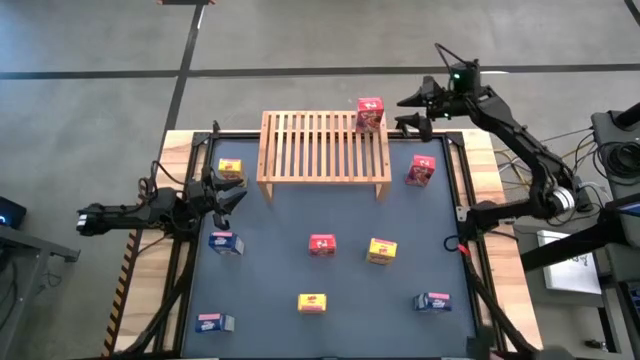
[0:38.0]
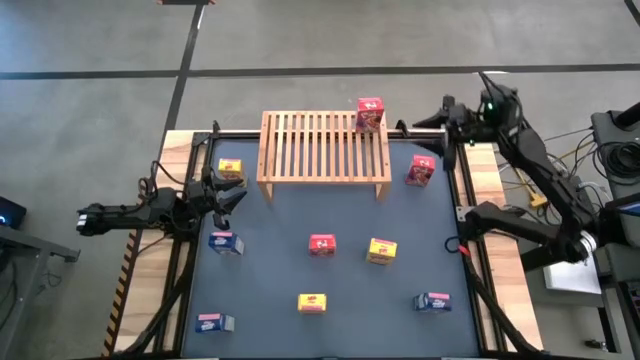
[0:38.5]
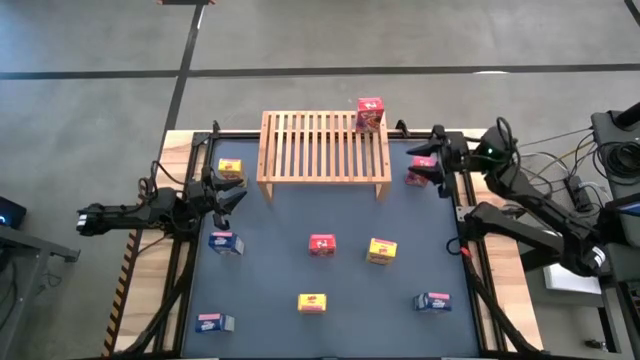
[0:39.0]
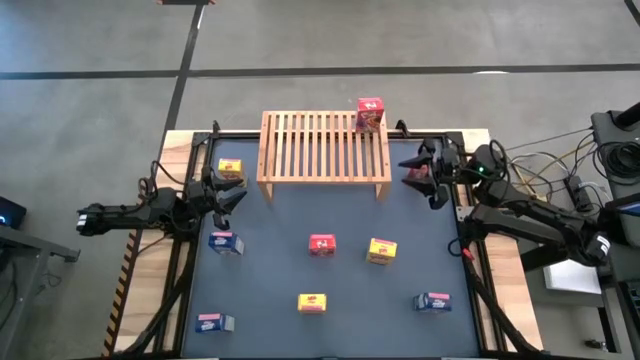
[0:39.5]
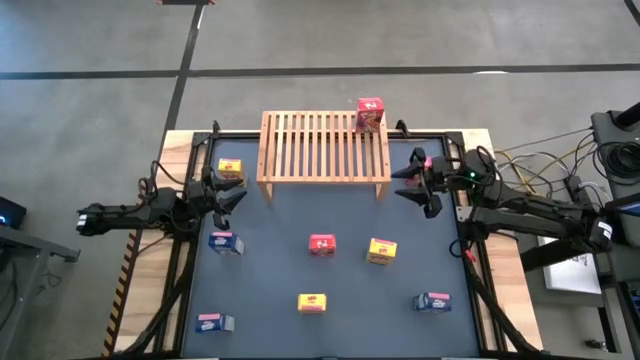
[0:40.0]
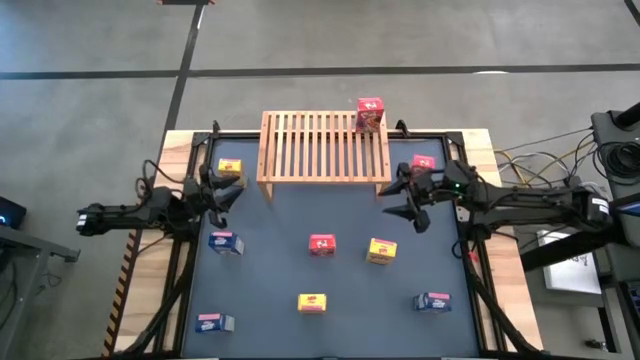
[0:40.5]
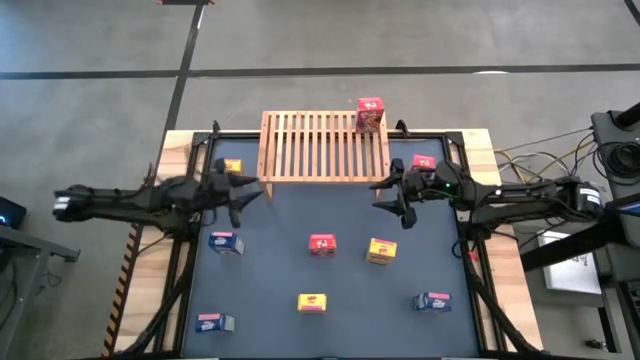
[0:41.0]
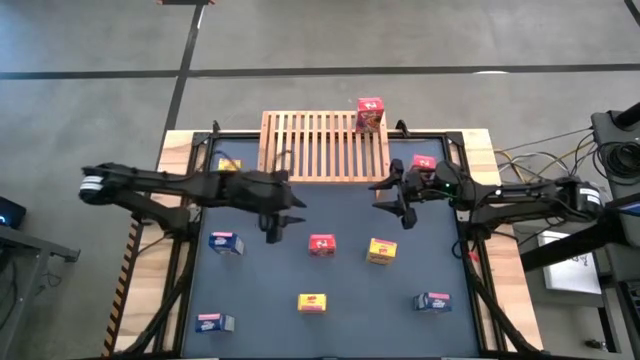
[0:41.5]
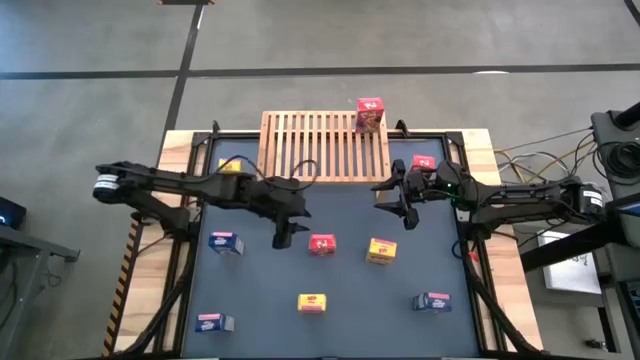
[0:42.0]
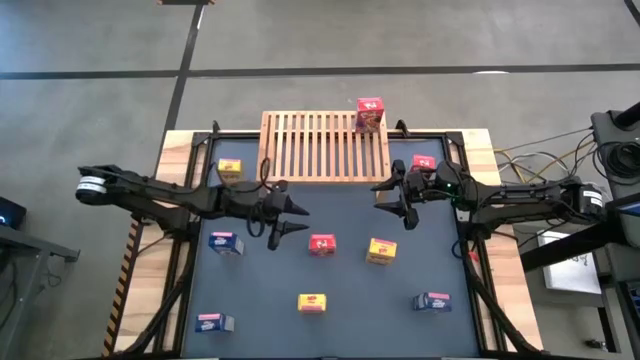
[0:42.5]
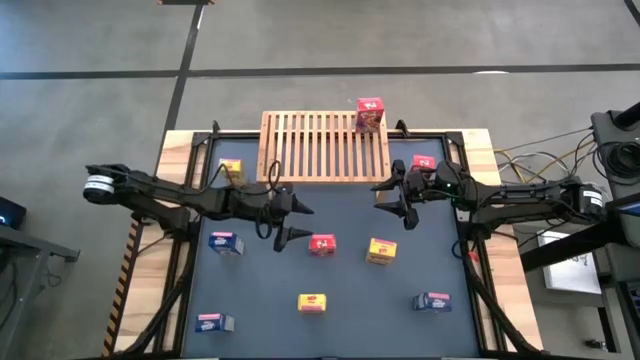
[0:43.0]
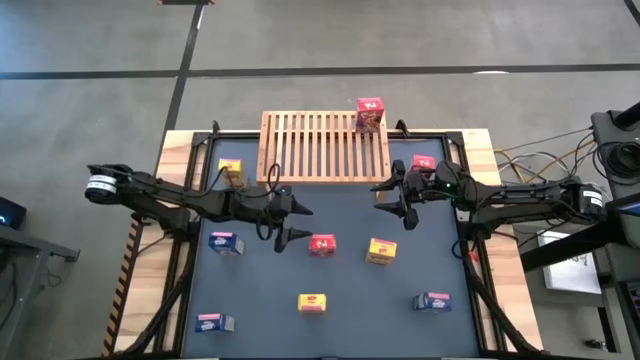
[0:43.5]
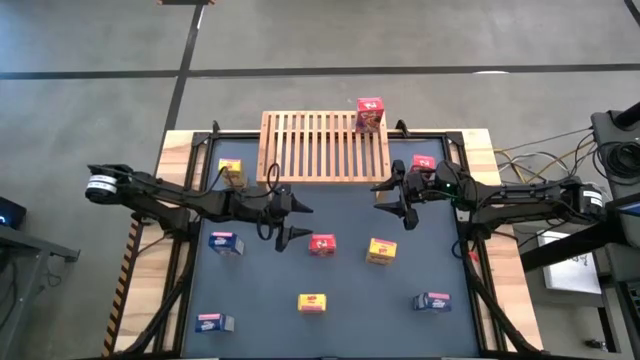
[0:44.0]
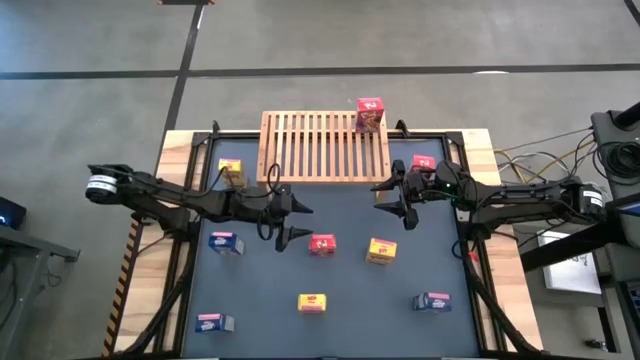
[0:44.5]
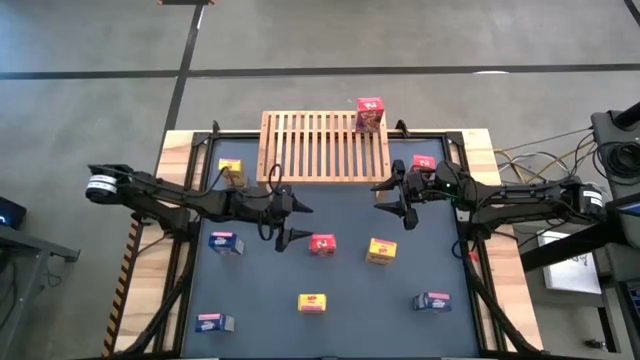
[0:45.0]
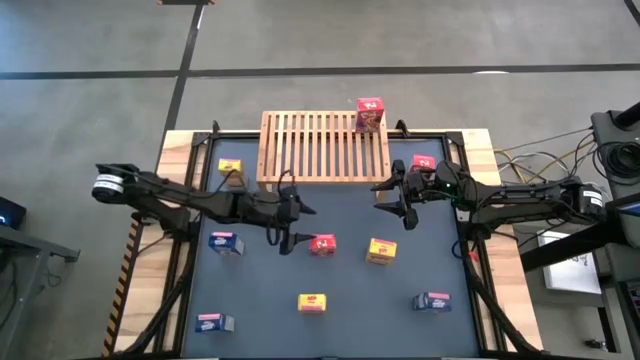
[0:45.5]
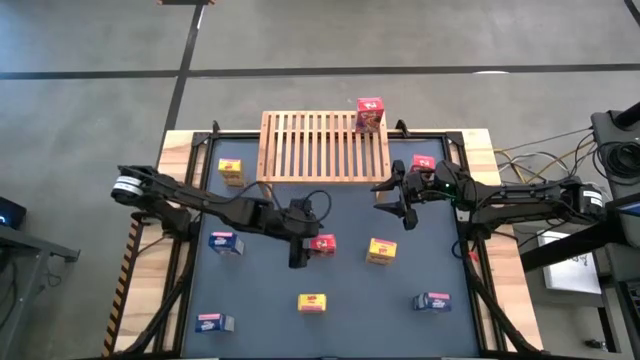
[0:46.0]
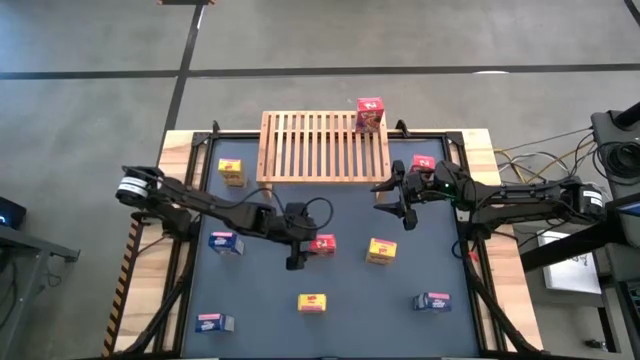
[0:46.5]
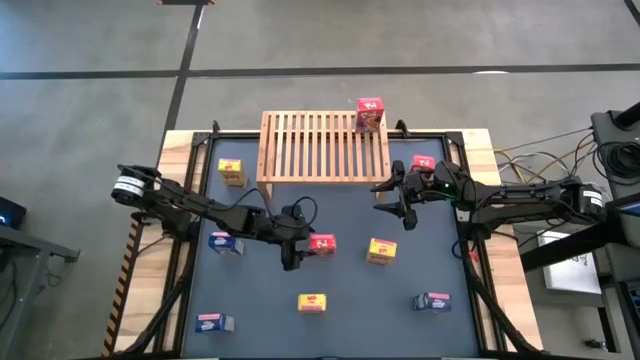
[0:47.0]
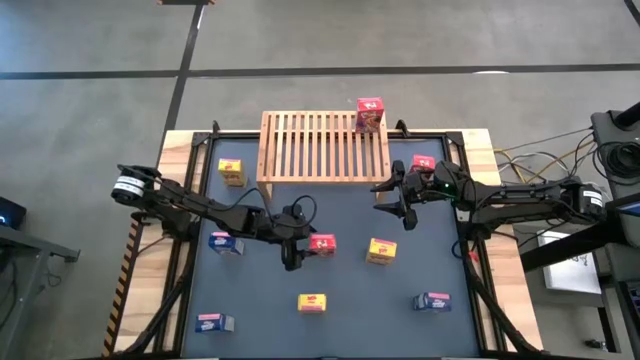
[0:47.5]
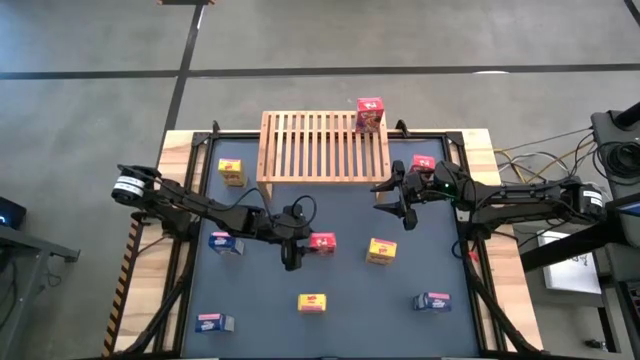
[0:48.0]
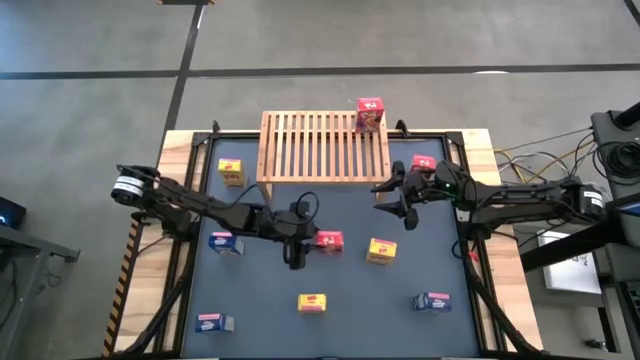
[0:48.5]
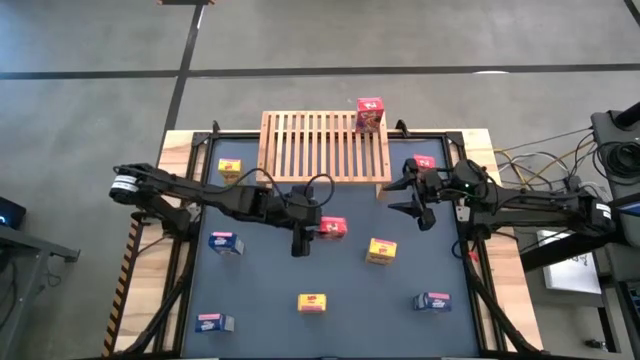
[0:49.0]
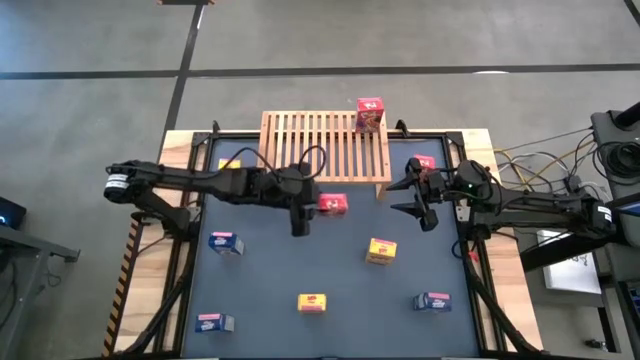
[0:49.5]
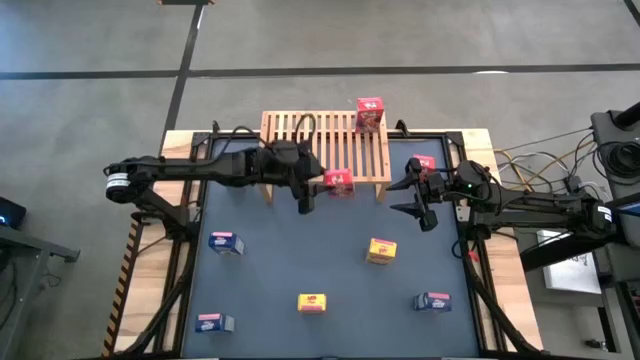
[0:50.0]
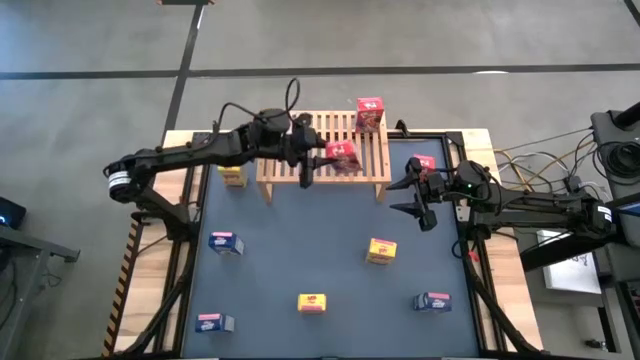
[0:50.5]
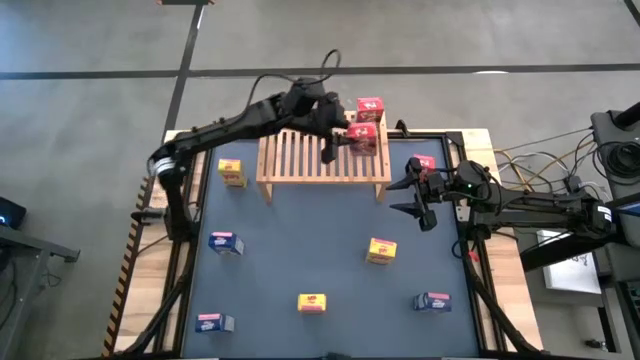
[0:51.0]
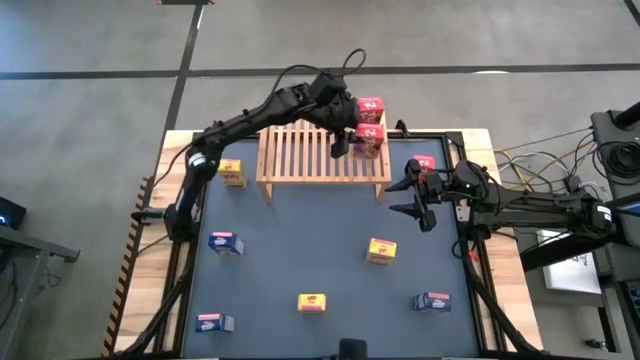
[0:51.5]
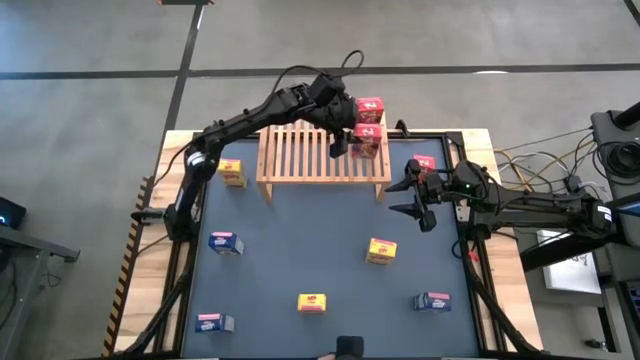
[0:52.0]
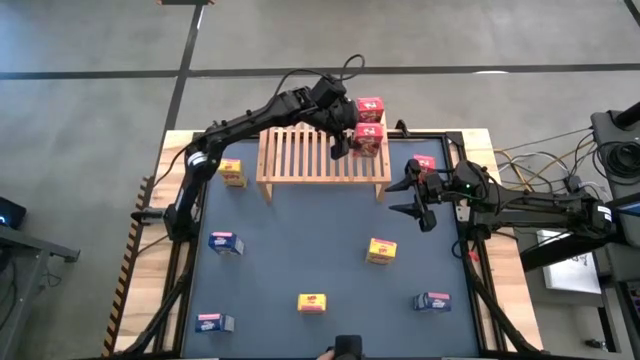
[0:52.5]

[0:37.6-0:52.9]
Task: Stack cereal on shelf
Put the bottom red cereal box on the shelf aligned with the red cereal box

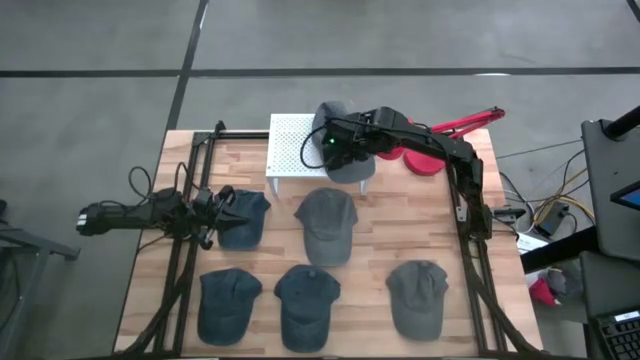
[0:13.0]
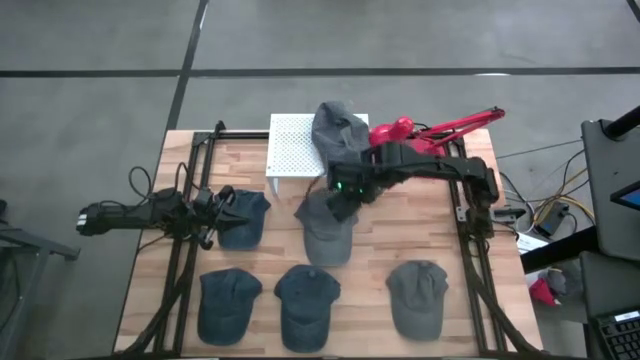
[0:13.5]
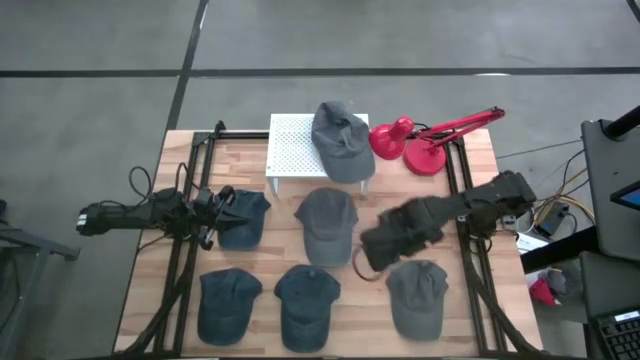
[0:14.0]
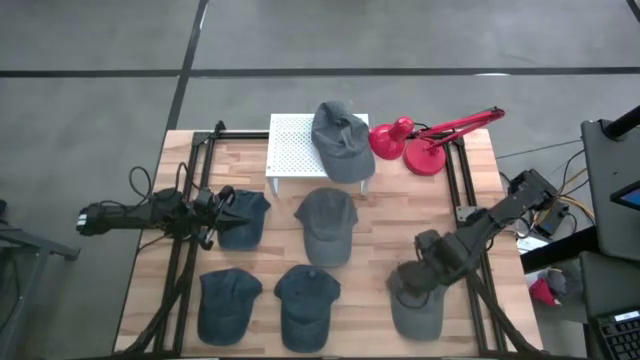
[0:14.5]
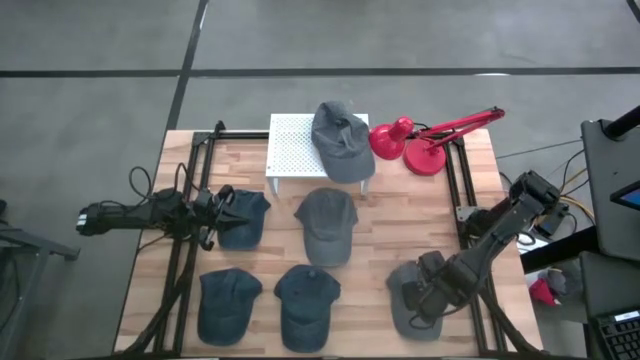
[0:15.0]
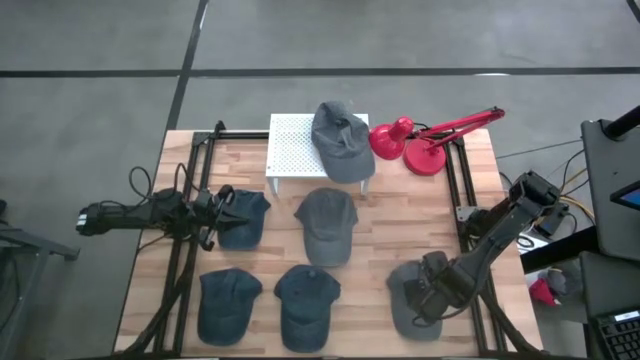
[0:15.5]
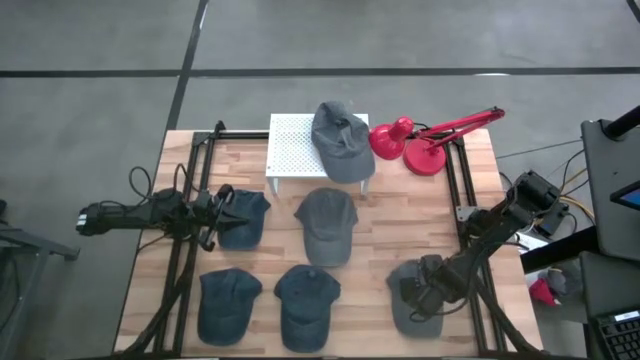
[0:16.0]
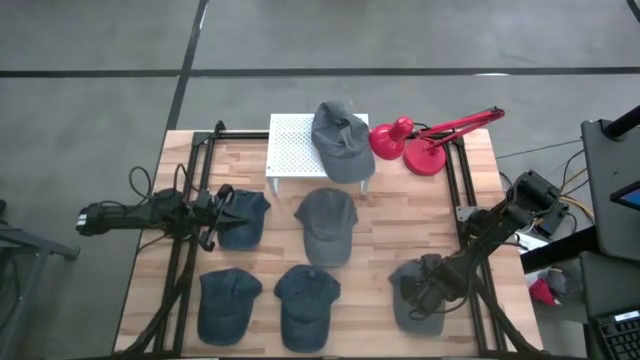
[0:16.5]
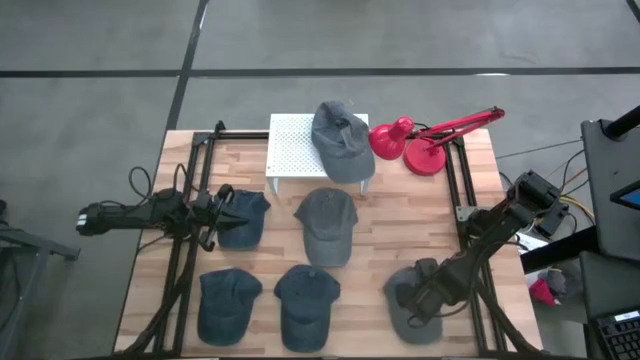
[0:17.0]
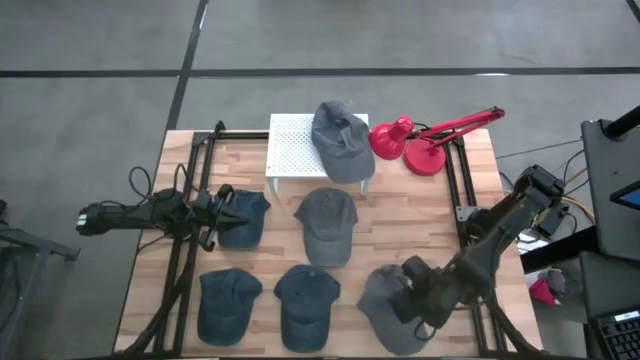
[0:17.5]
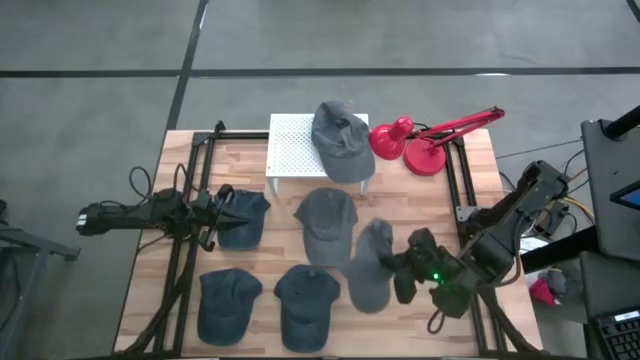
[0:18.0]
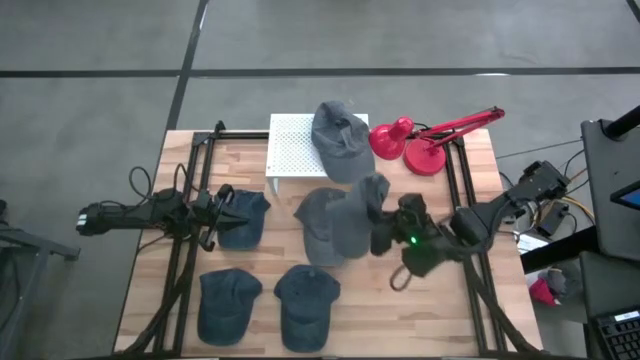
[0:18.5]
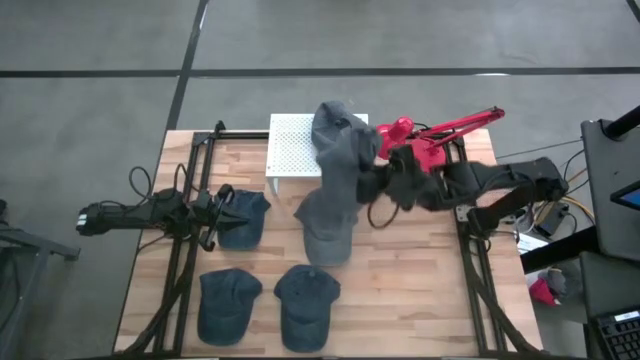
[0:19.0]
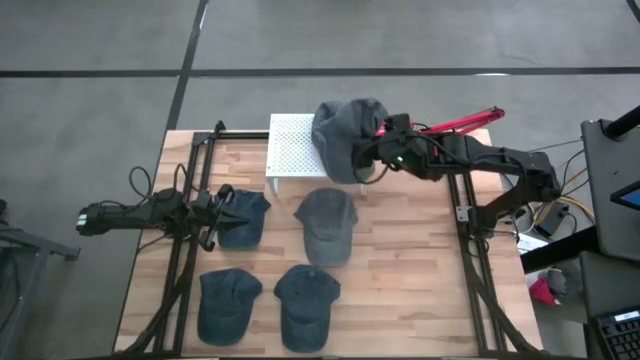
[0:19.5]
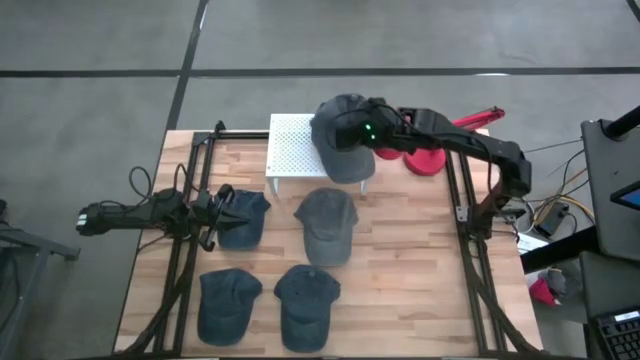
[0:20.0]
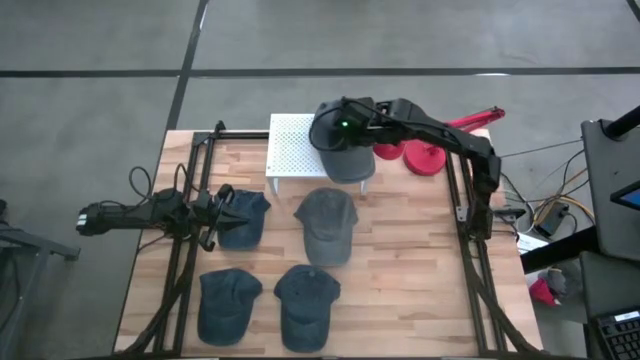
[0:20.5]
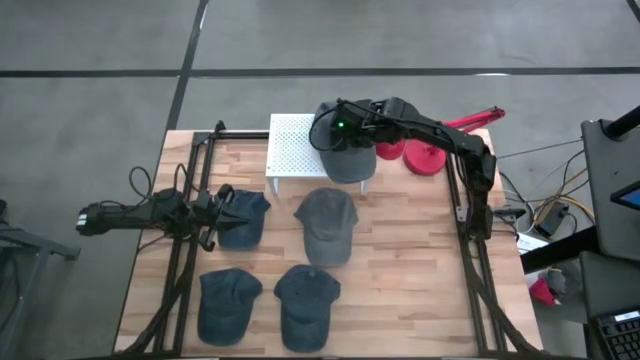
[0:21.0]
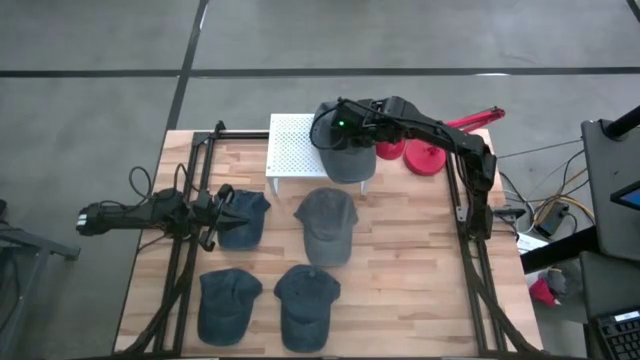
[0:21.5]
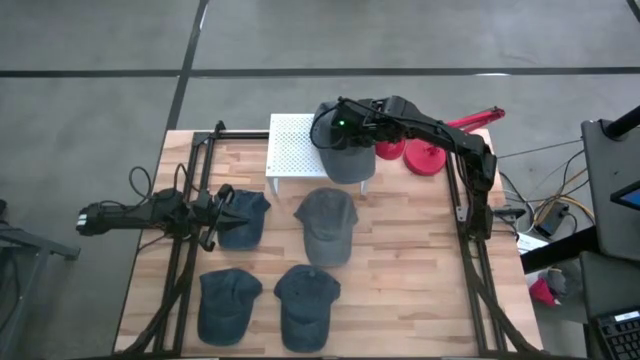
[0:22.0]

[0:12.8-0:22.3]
Task: Pick & Place hat
Stack the bottom gray cap on the gray cap on the shelf
